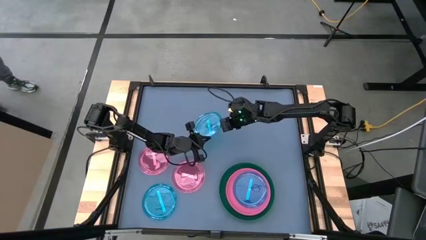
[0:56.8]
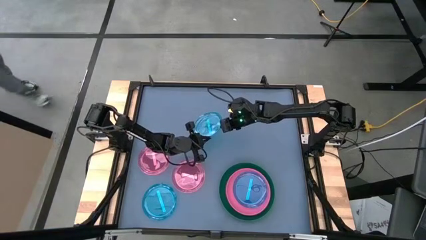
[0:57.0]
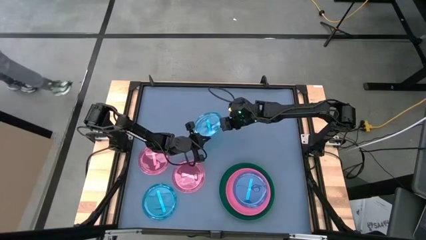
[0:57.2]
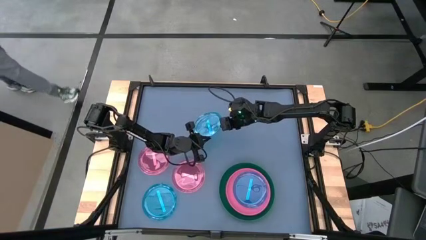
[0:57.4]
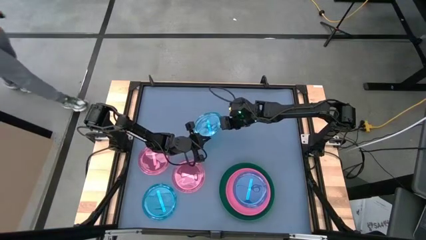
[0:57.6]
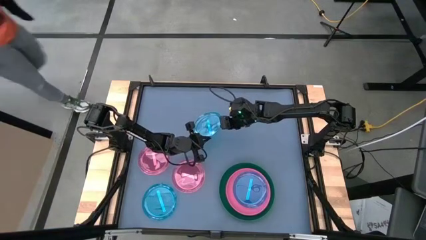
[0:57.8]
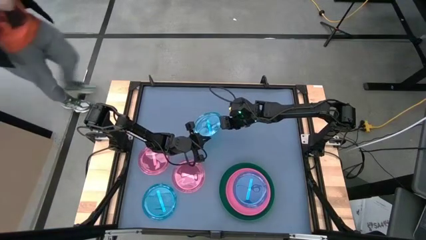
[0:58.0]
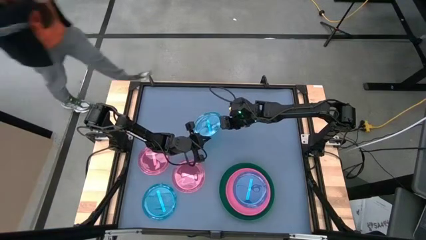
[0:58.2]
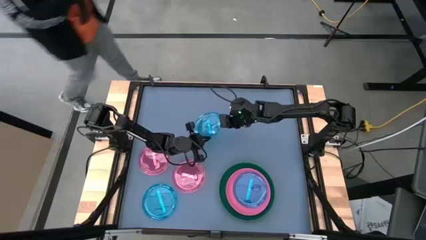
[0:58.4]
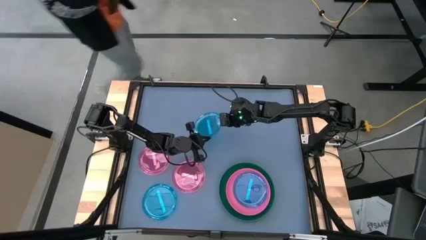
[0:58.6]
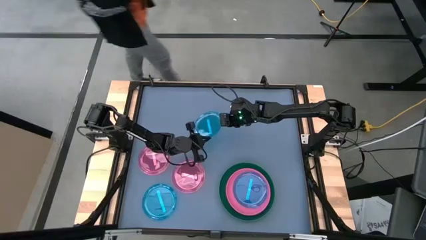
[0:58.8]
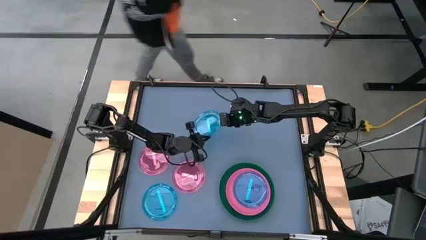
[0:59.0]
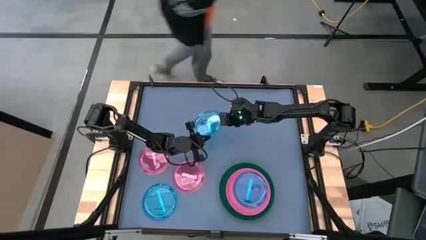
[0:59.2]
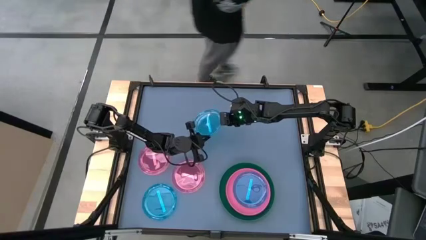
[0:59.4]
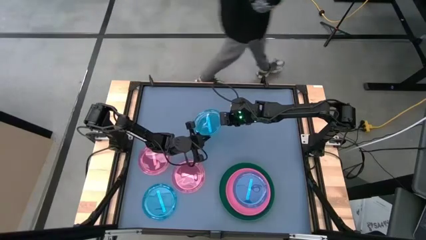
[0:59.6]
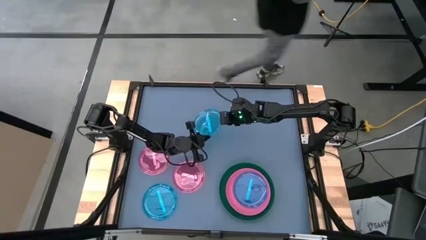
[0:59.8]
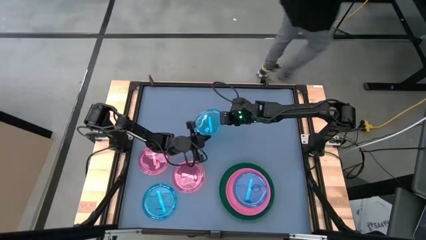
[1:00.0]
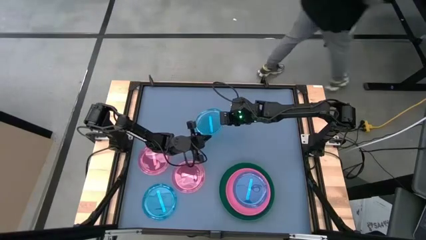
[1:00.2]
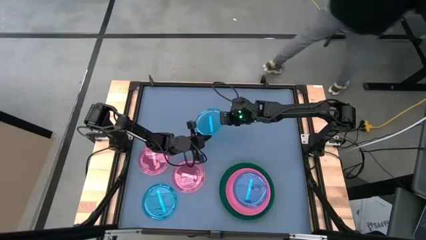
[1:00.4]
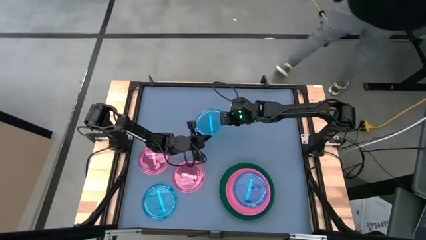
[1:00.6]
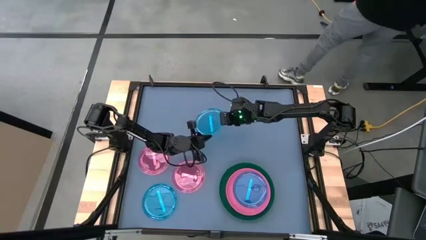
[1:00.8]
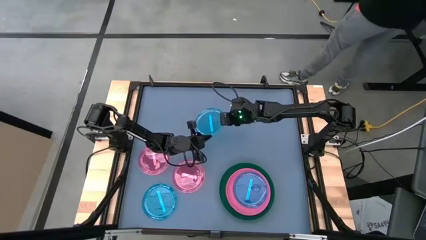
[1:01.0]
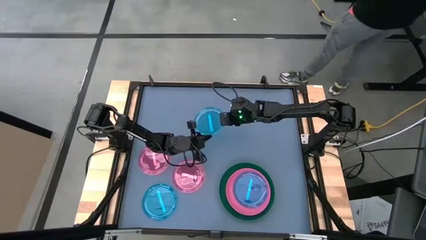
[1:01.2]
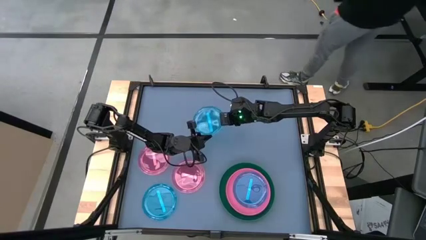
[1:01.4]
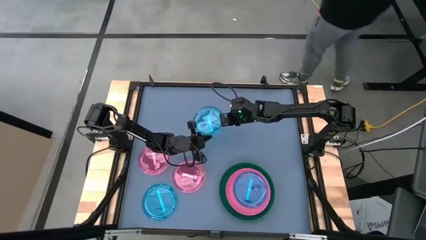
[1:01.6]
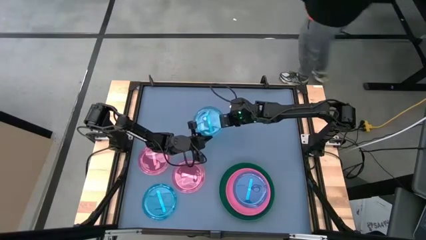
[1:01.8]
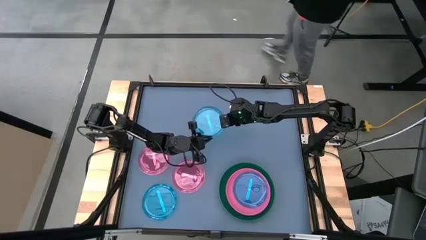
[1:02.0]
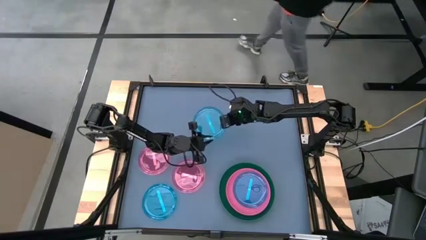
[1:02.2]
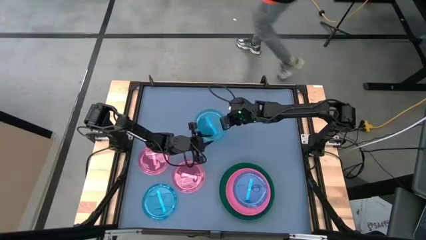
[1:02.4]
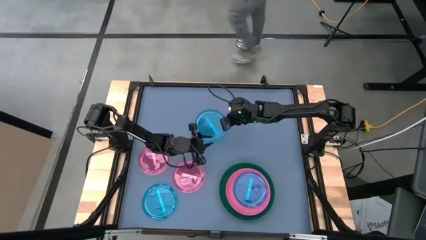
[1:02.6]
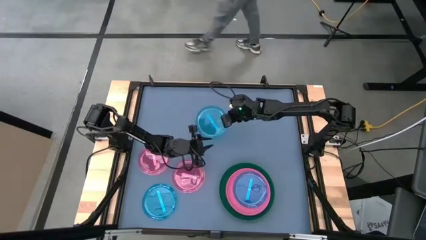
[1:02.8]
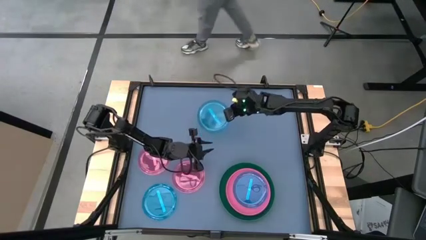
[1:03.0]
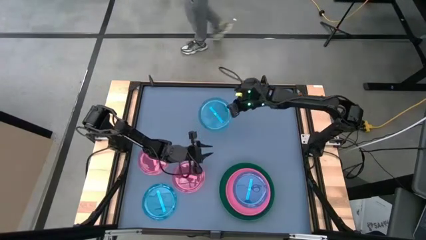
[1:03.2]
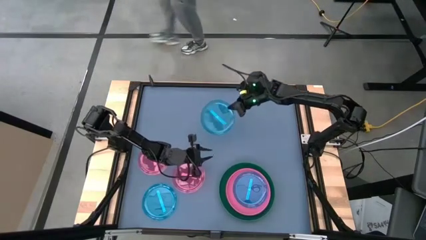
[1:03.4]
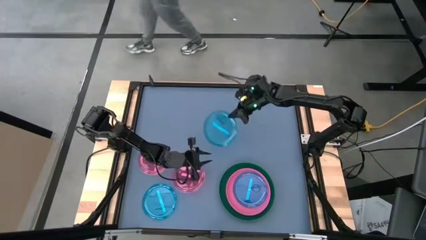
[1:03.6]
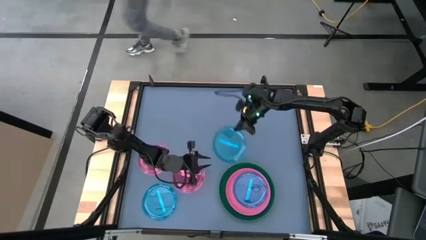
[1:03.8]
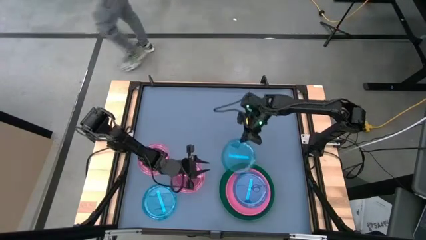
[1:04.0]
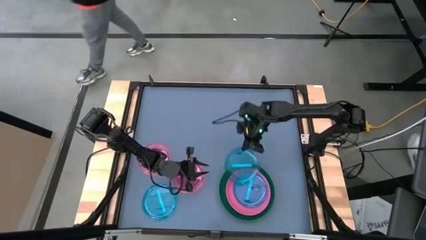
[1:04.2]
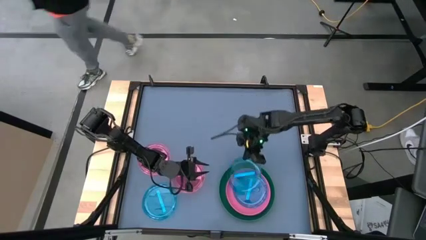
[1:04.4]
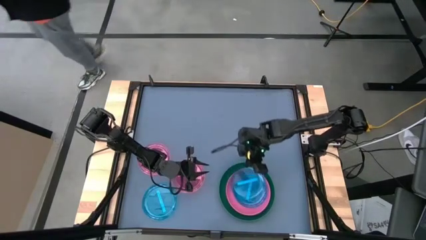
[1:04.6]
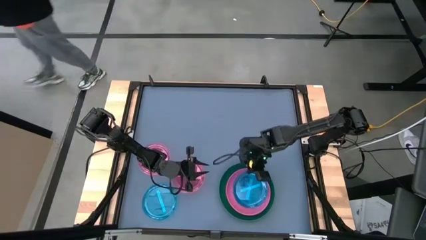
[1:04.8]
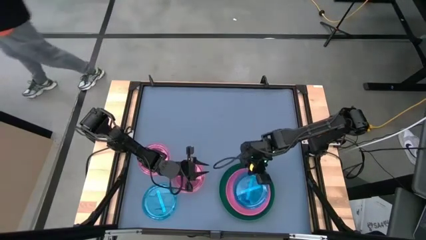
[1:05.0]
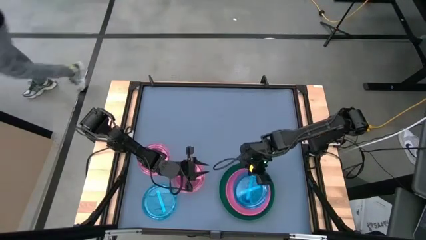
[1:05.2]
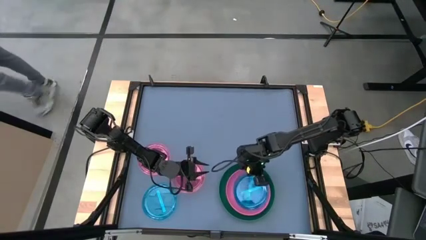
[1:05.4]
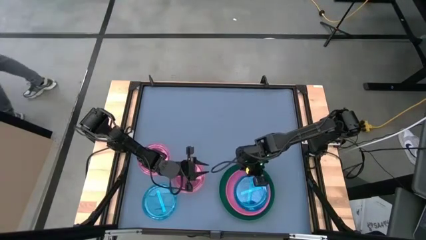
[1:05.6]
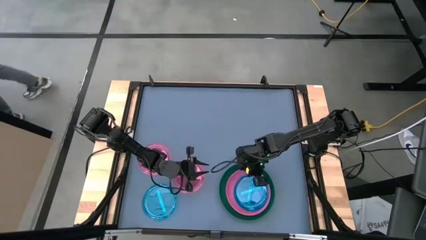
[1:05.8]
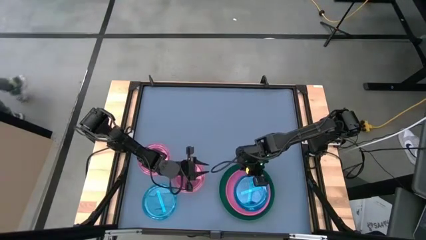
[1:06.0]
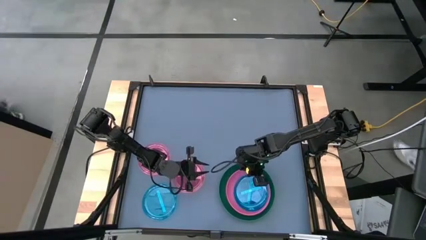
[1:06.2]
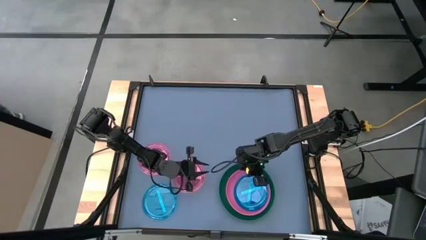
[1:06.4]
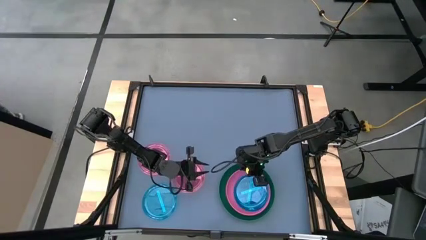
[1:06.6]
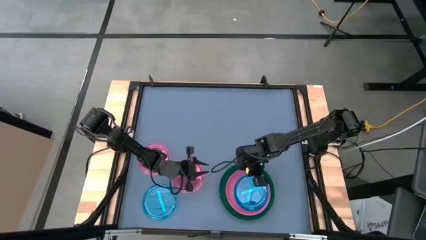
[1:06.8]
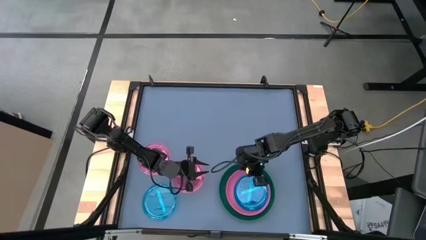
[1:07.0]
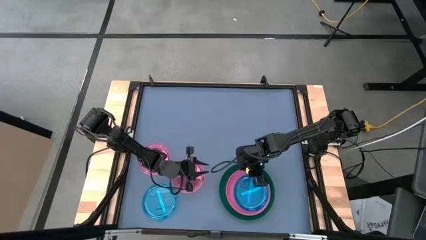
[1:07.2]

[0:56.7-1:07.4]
Task: Stack plastic plates
Stack the top blue plate on top of the blue plate

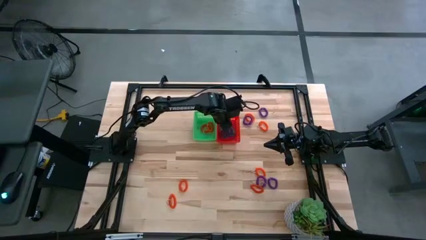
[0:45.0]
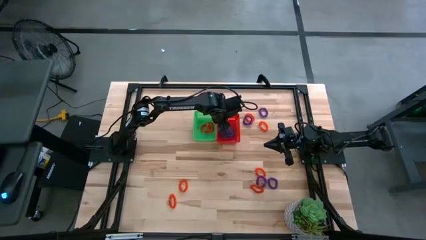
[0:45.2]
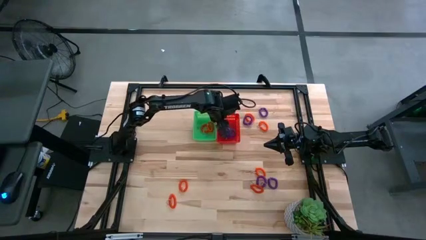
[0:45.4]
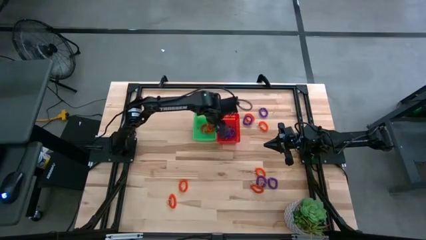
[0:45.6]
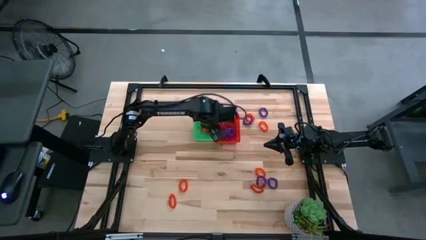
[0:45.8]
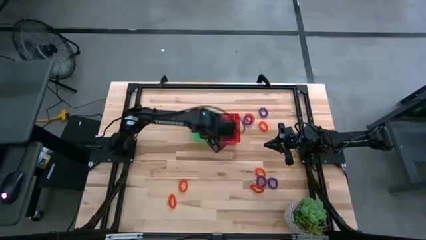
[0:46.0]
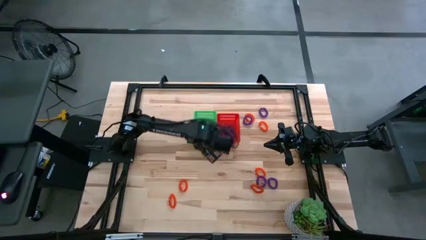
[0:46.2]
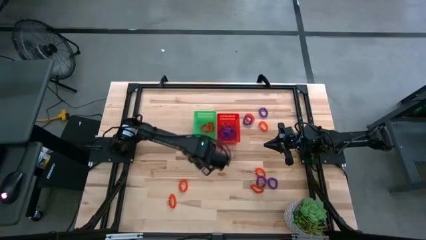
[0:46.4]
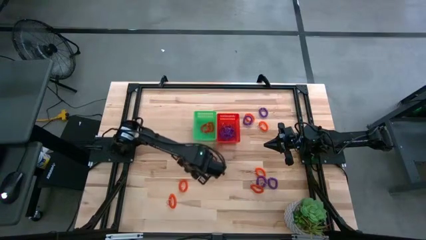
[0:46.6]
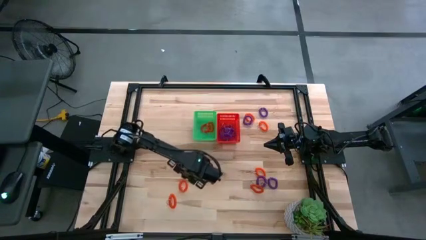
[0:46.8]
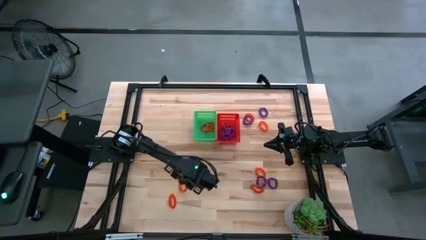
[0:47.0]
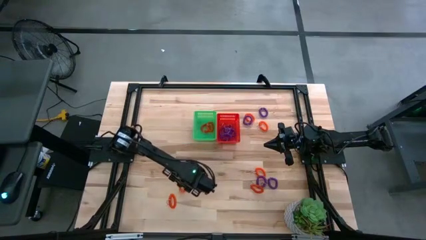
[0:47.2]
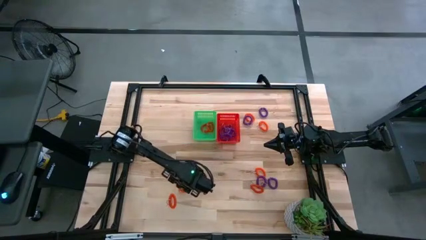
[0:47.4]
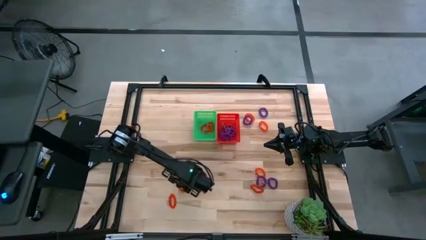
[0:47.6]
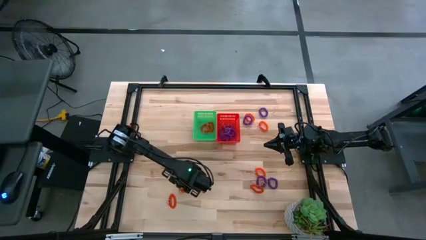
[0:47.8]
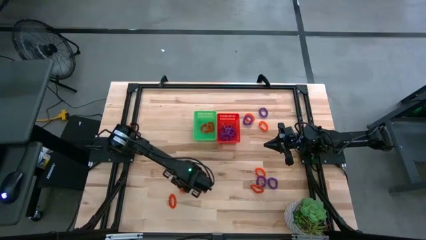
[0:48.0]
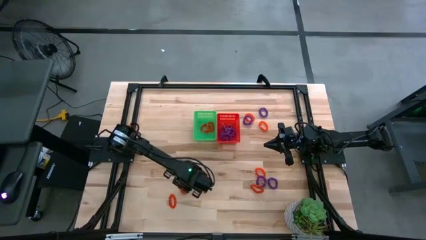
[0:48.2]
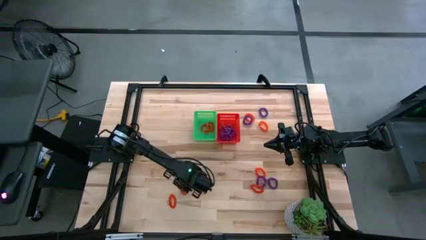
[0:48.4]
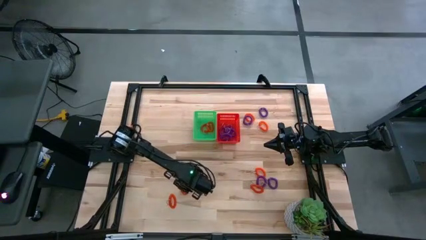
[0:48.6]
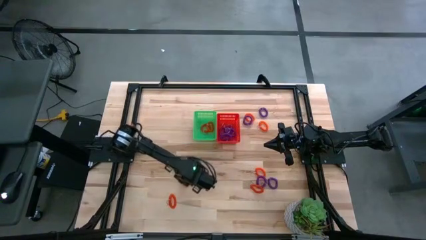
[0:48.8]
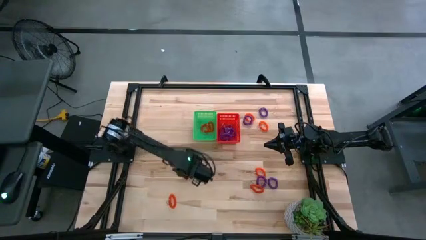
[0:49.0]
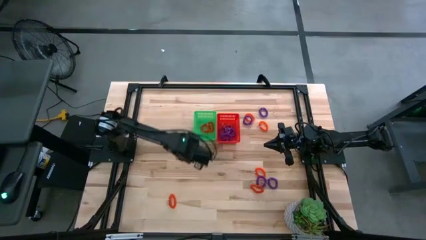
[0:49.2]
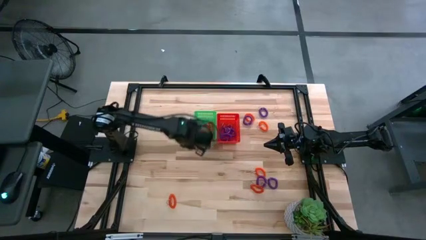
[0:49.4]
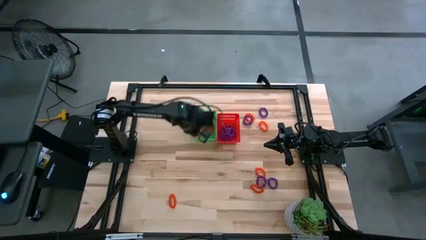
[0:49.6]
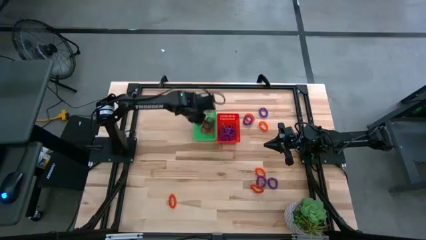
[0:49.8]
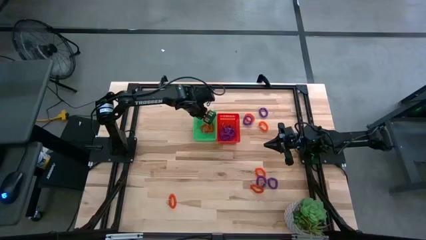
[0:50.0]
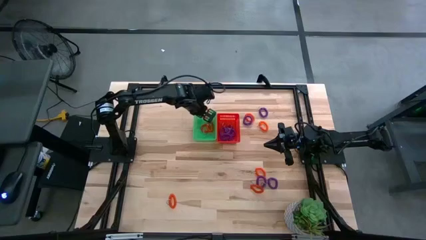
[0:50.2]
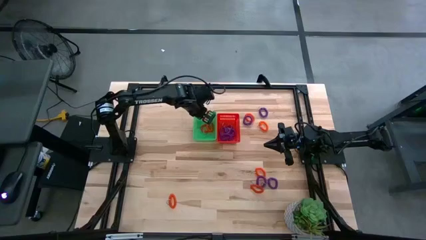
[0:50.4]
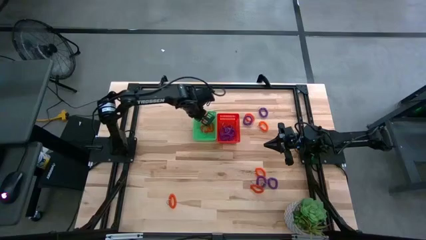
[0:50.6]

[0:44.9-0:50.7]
Task: Sort spring keychains
Put the orange spring keychain into the green bin

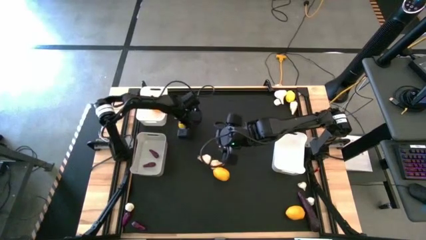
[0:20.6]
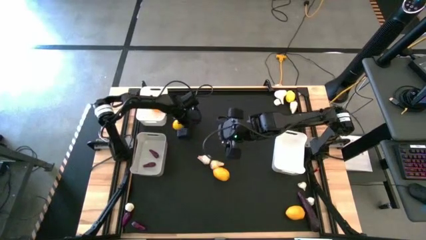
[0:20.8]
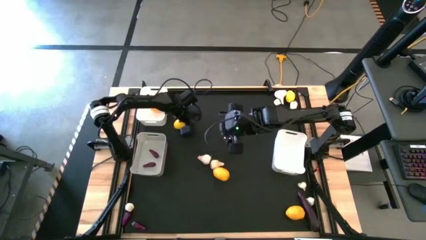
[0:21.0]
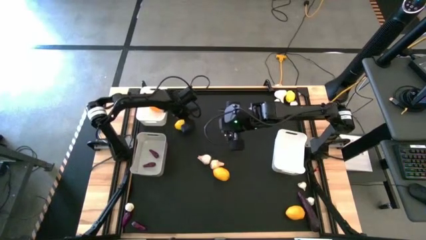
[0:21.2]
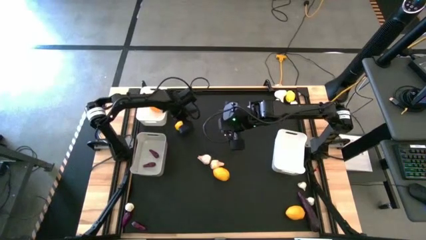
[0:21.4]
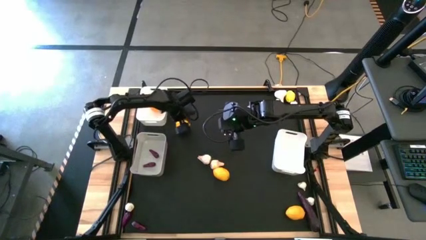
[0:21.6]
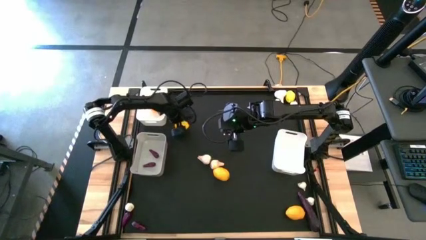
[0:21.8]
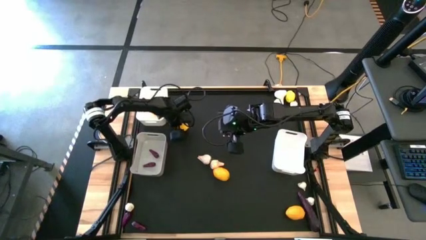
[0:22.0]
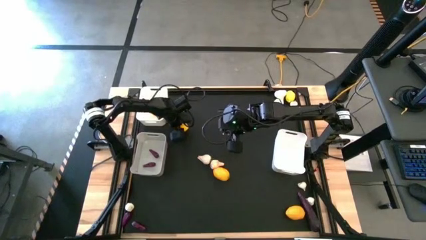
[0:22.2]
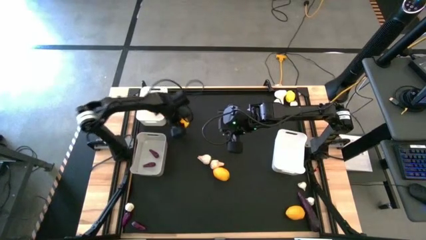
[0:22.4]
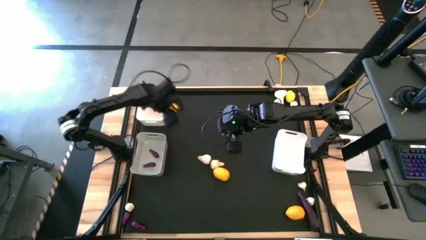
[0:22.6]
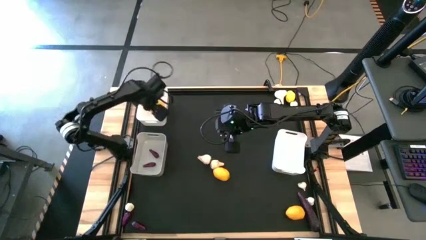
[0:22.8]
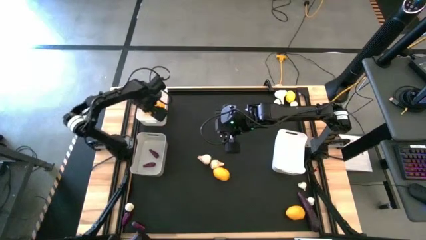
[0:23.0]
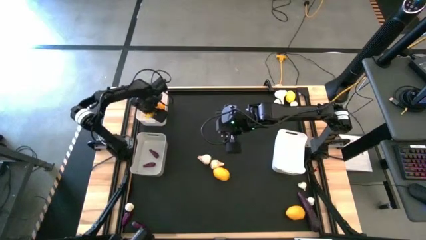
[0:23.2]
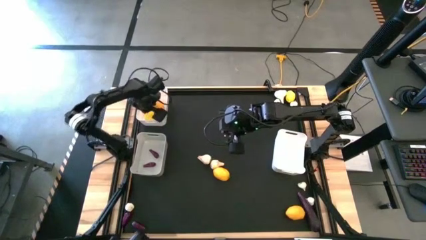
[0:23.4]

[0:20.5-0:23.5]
Task: Sort produce into baskets
Put the yellow lemon into the top white bin
